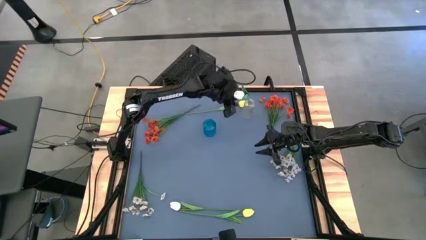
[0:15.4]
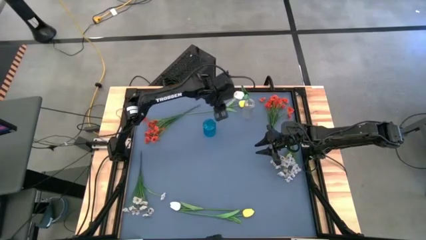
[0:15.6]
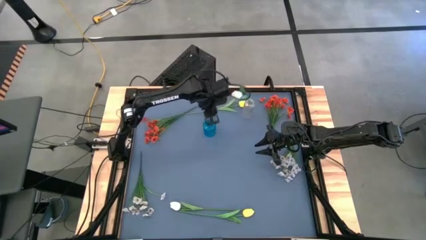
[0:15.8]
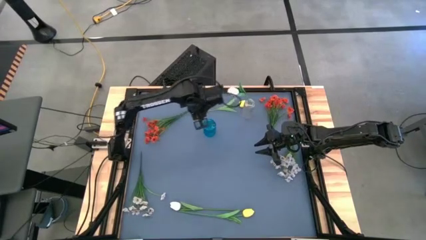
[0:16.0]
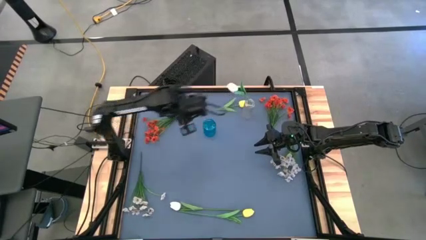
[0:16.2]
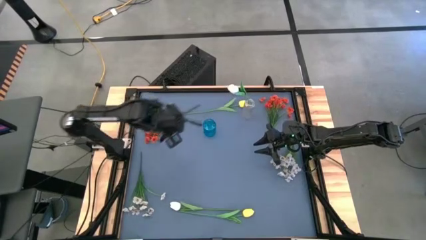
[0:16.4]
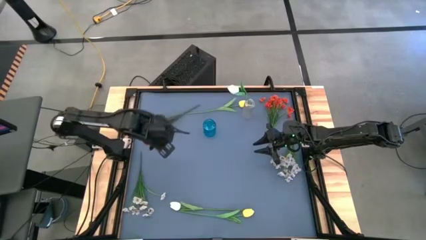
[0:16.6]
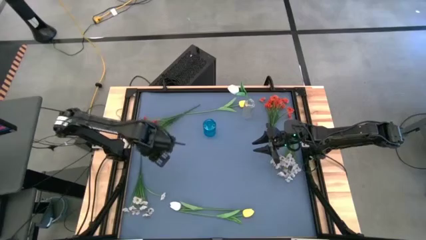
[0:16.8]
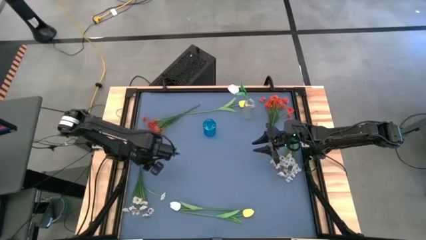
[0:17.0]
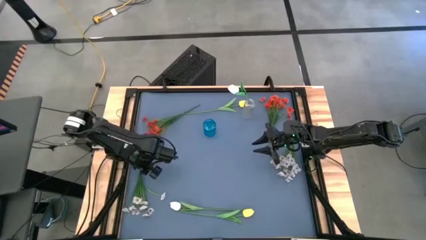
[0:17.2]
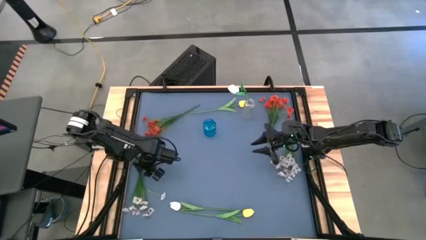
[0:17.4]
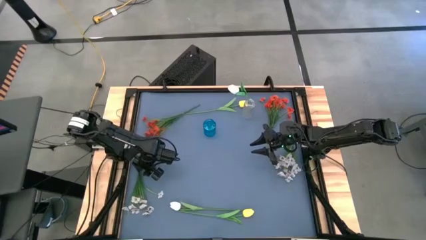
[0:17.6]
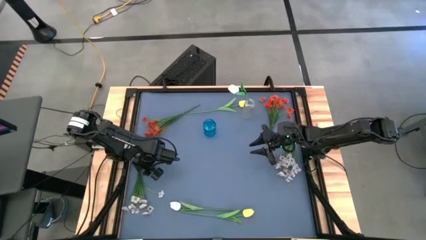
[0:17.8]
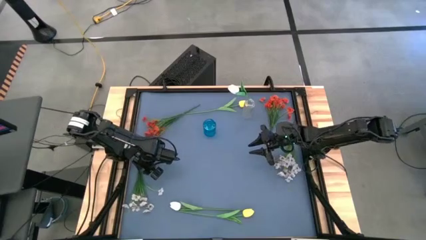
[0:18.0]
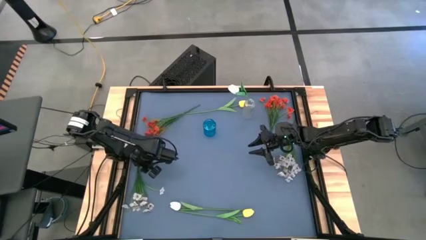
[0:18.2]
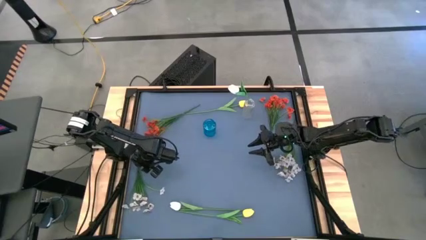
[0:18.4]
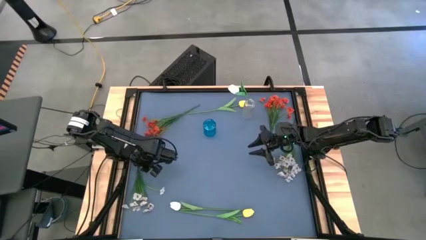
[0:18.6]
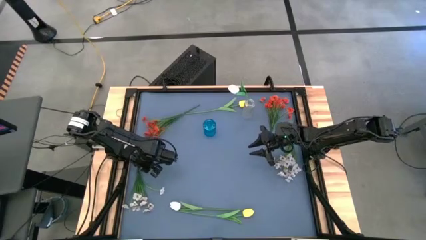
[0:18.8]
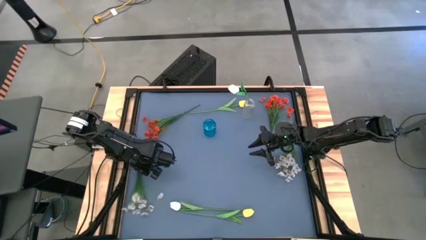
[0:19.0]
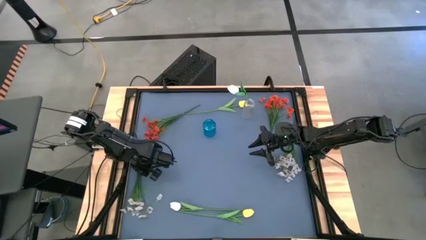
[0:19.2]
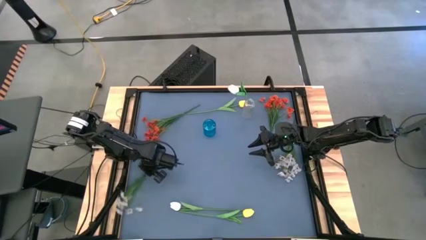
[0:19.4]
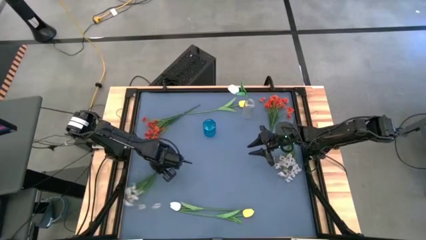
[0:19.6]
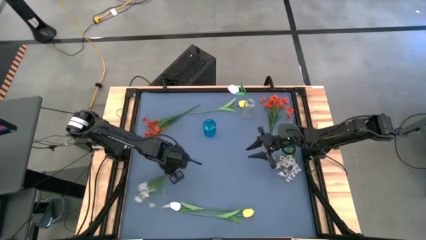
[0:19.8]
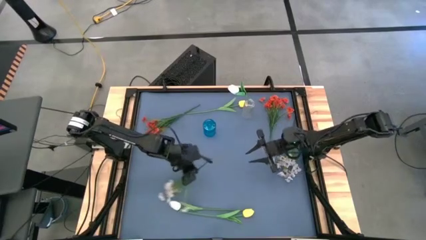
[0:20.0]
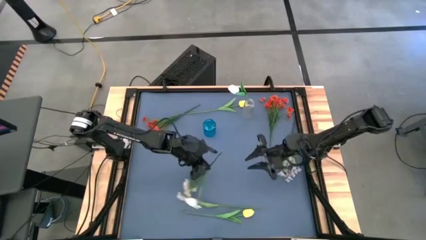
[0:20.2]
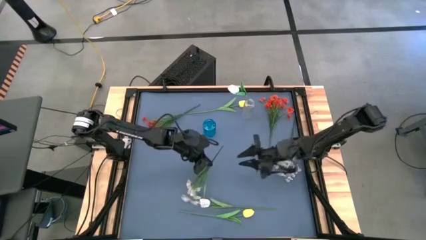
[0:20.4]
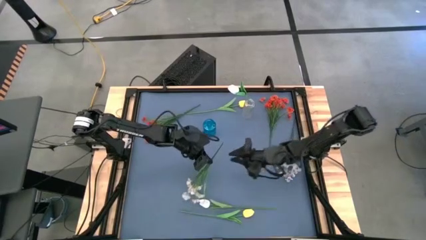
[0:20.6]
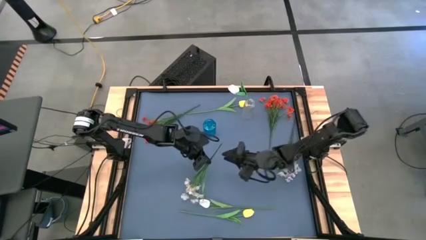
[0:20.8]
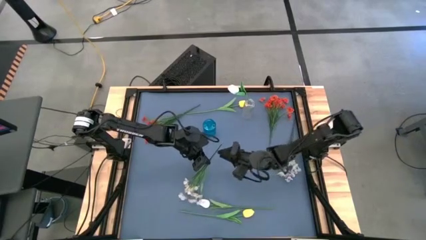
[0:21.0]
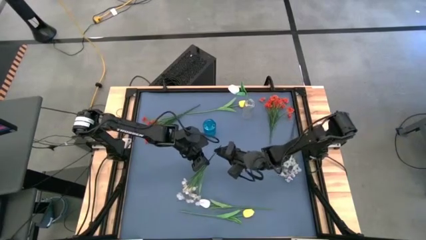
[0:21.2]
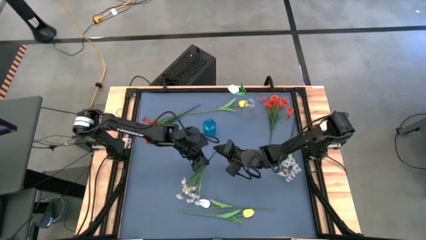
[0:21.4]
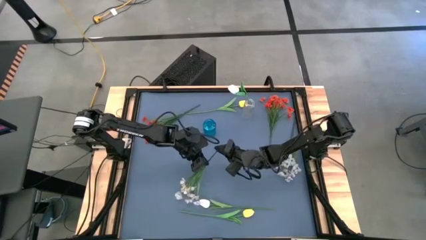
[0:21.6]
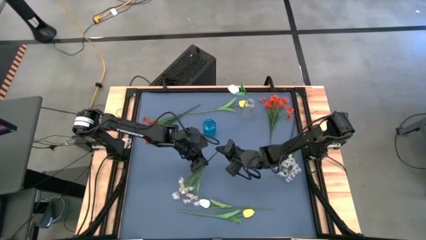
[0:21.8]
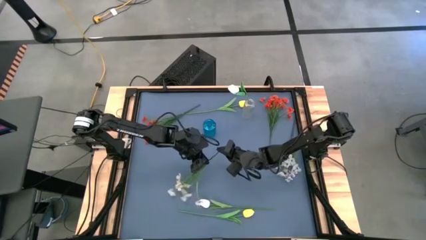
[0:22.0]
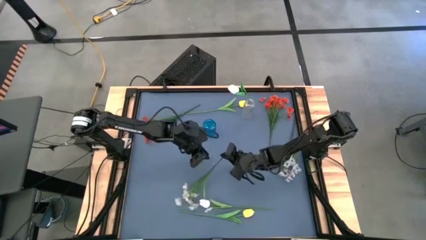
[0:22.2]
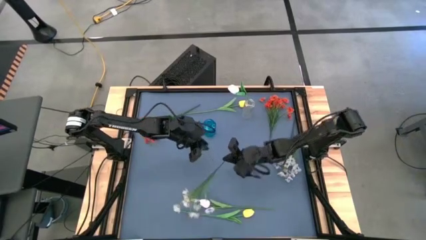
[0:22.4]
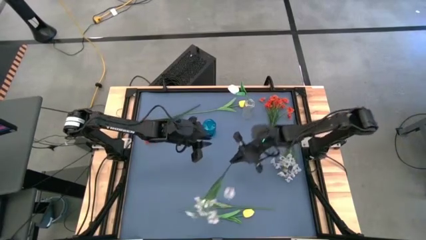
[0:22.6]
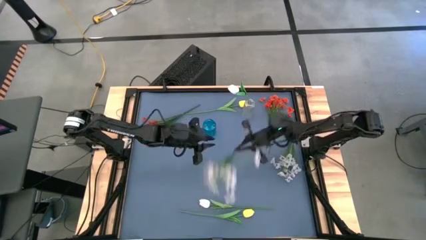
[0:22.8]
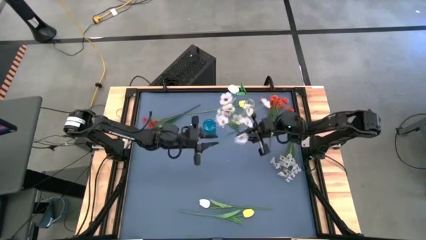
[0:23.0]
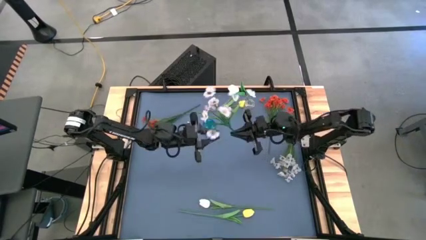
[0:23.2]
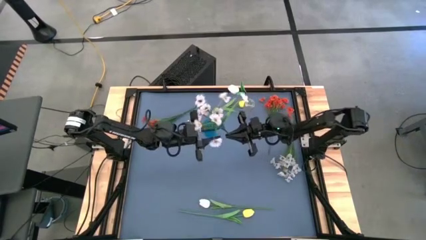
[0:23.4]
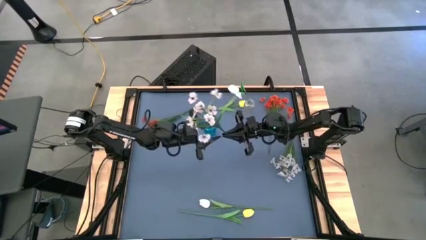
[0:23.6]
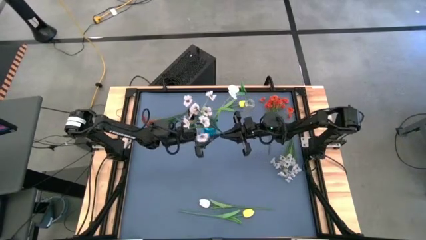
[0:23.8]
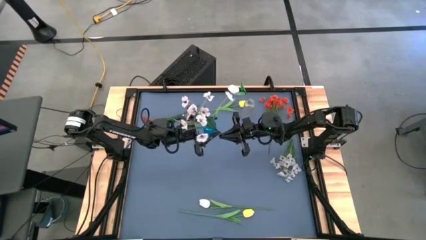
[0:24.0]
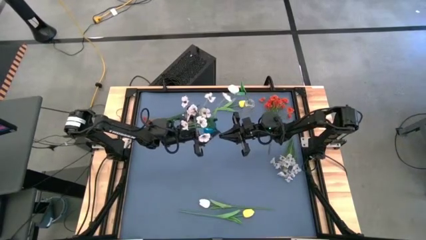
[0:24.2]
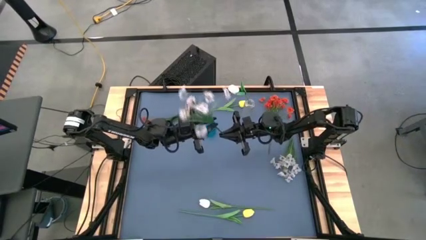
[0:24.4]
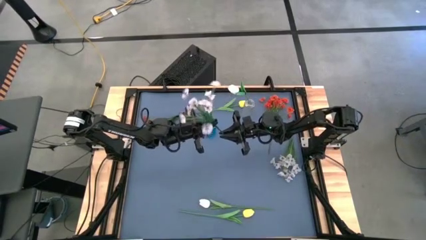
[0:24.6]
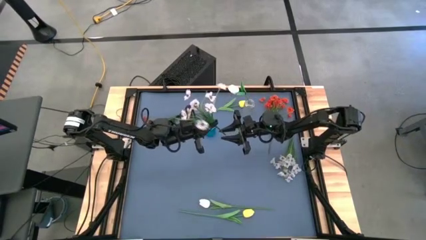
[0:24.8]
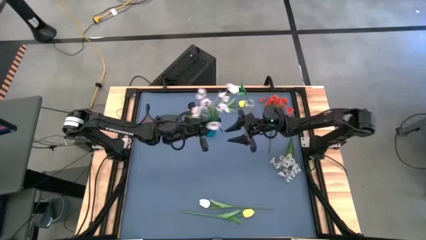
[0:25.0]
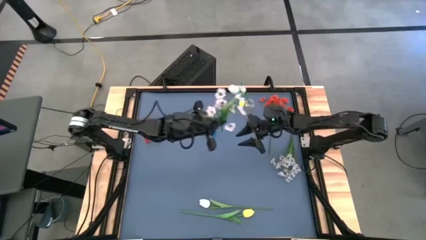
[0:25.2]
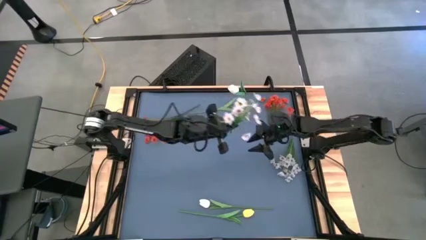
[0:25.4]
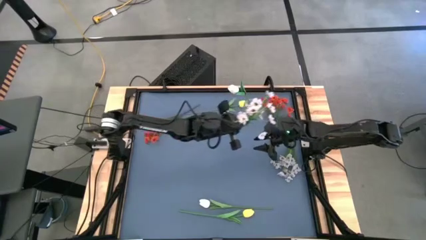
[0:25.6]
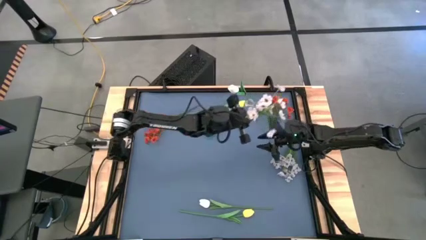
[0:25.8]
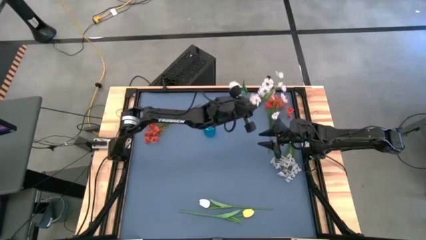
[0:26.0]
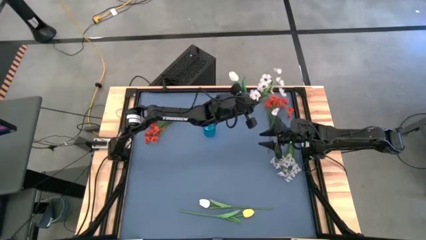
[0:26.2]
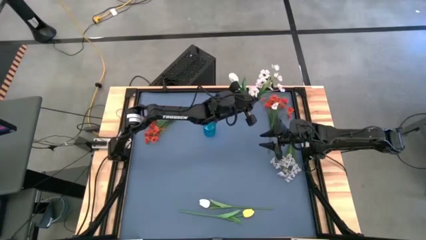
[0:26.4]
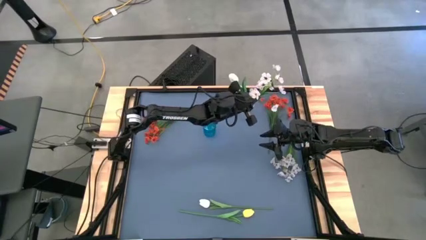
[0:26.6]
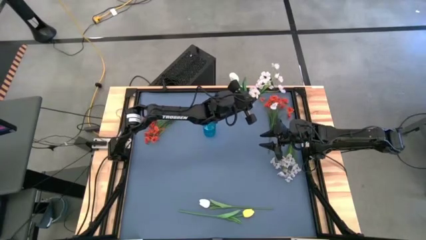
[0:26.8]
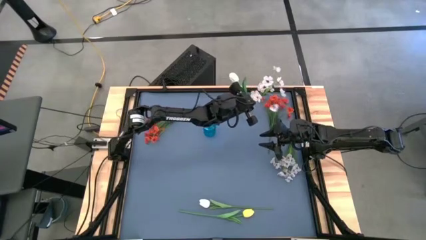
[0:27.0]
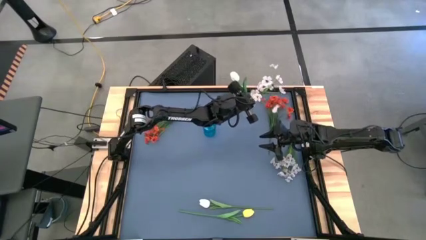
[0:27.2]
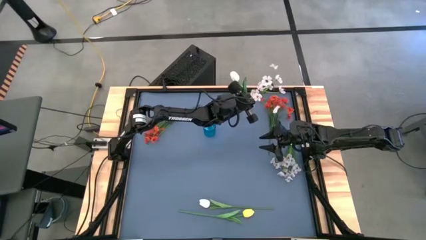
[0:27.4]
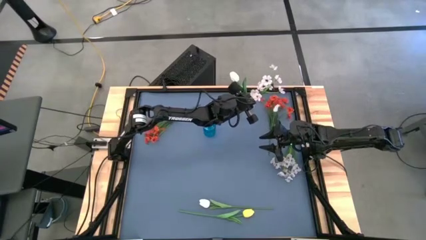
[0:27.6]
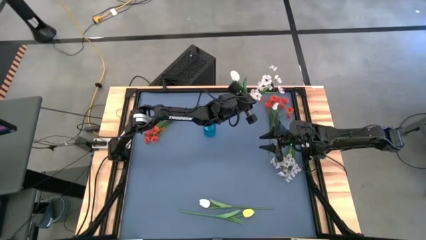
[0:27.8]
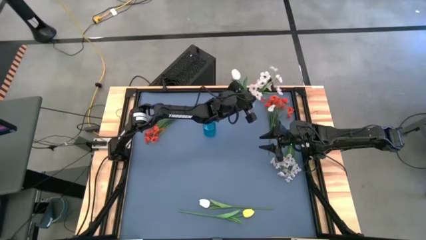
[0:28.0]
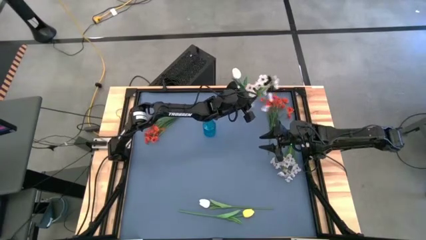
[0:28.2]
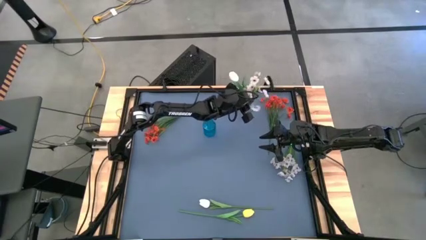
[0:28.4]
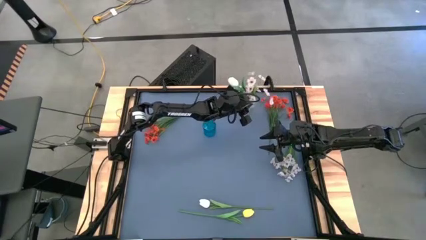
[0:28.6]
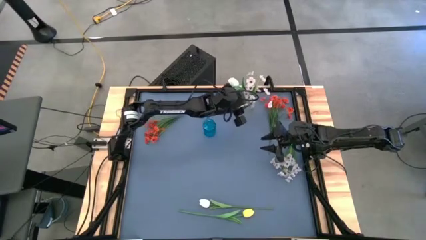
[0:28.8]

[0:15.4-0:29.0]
Task: Sort flowers into vase by color
Put the left white flowers into the transparent vase
